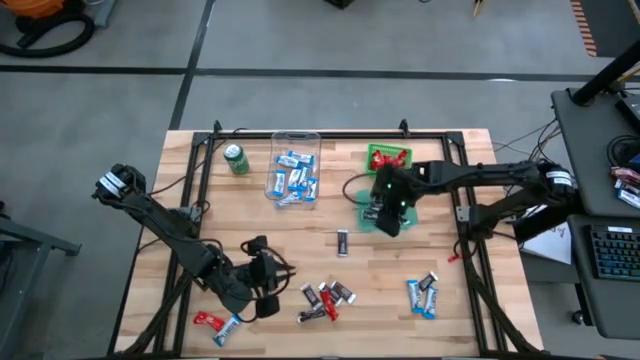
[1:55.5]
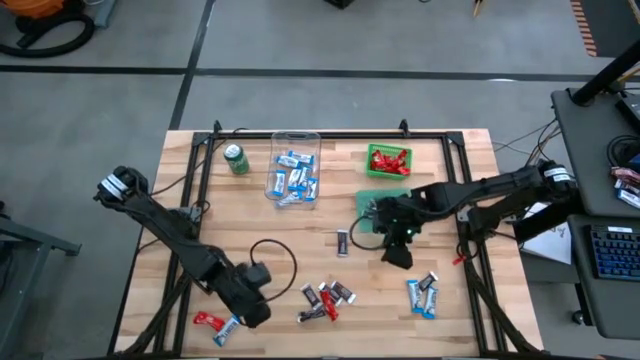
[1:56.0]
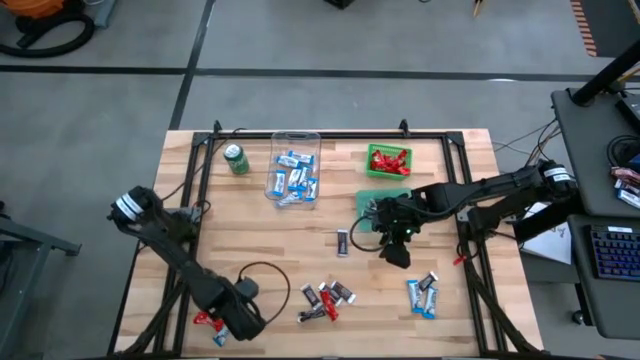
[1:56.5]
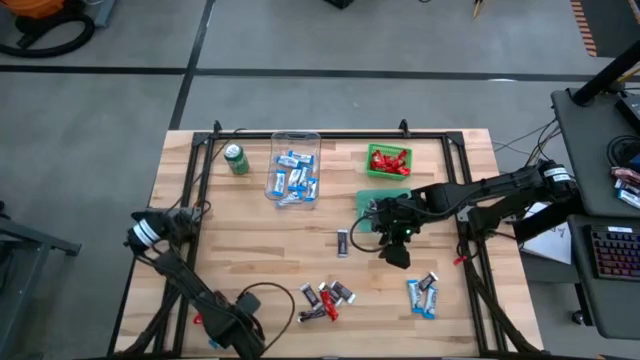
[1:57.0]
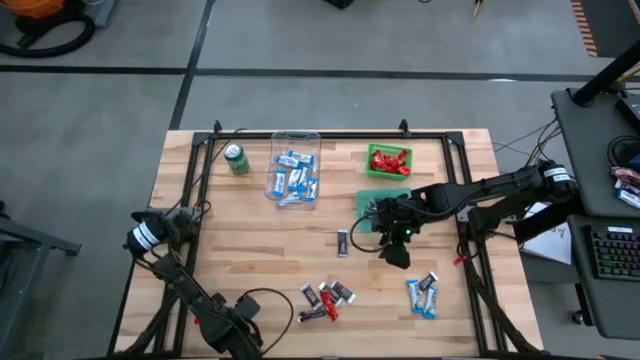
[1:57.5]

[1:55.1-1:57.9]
Task: Sort candy
Put the white candy into the transparent bin

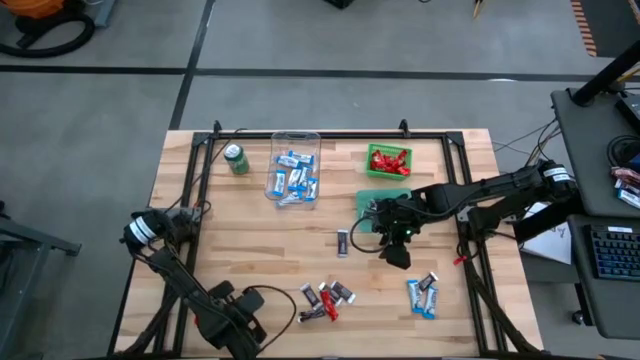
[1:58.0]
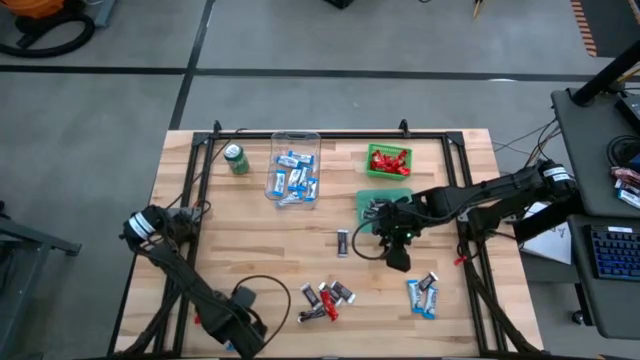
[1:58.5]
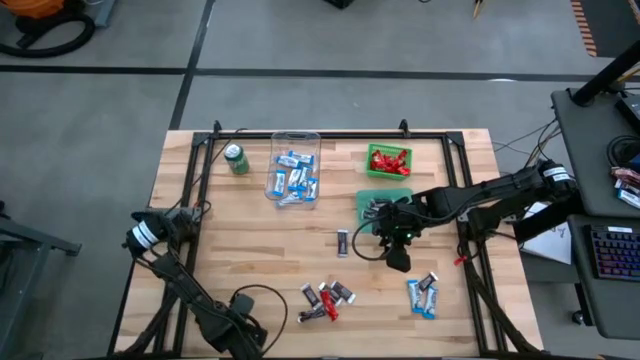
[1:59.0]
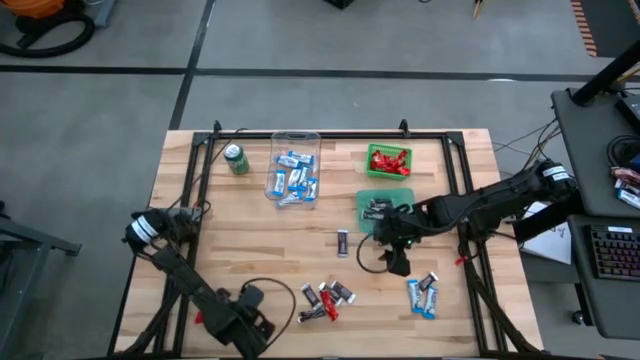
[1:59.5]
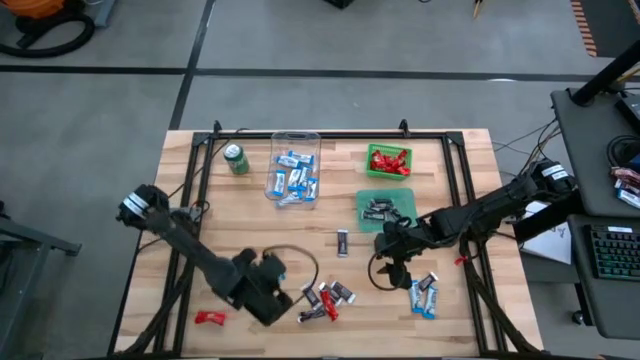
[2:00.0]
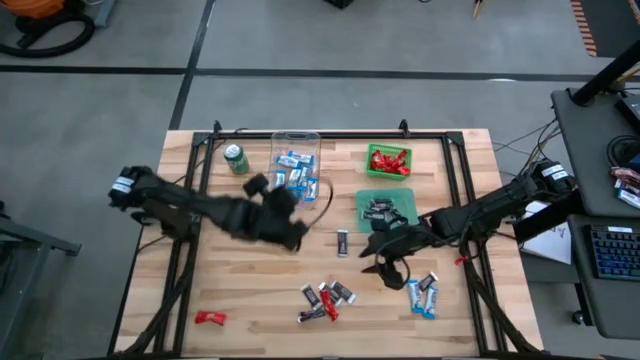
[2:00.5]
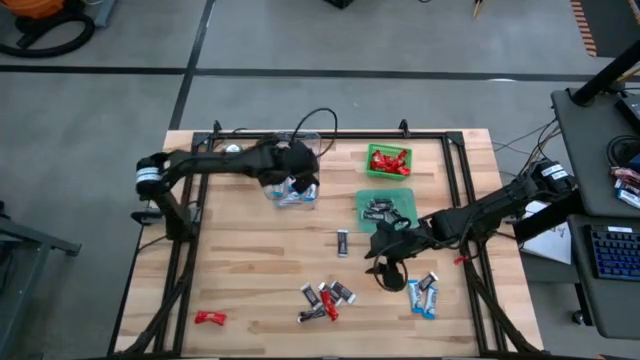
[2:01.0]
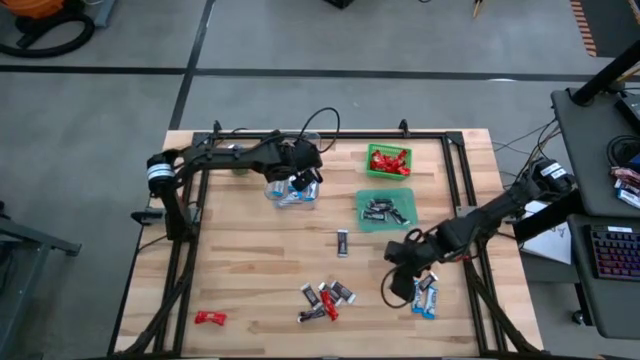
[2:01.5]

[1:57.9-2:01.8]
Put the white candy into the transparent bin

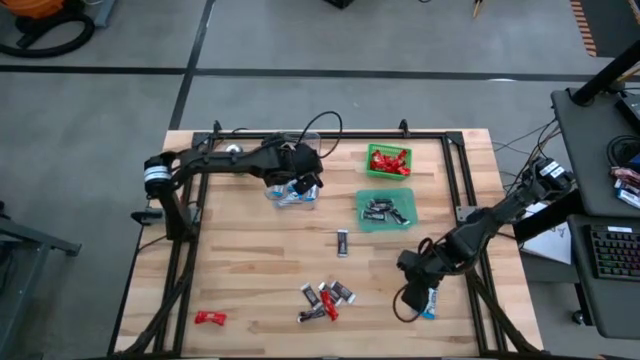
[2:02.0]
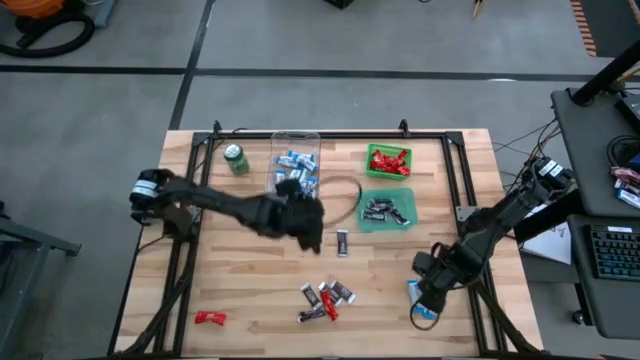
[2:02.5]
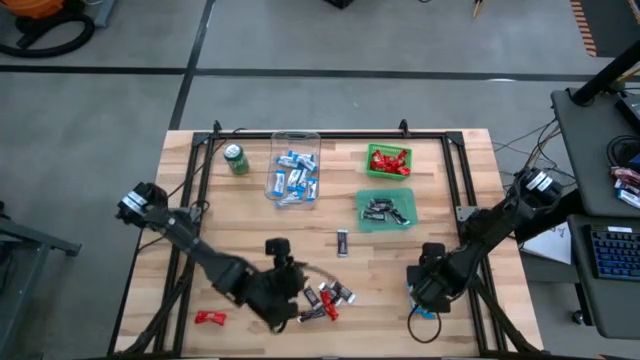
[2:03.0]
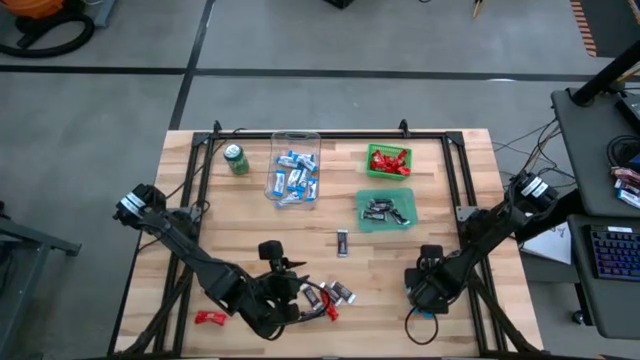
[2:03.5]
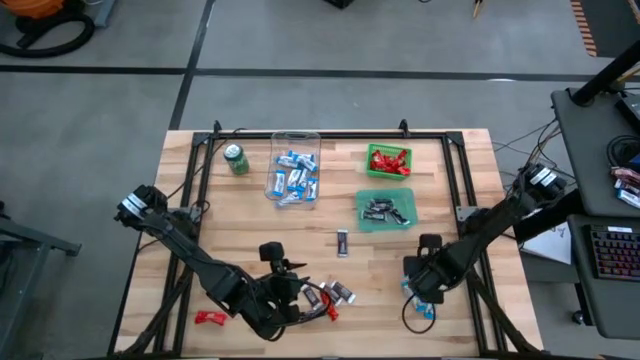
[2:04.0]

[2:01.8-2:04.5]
Put the brown candy into the blue bin

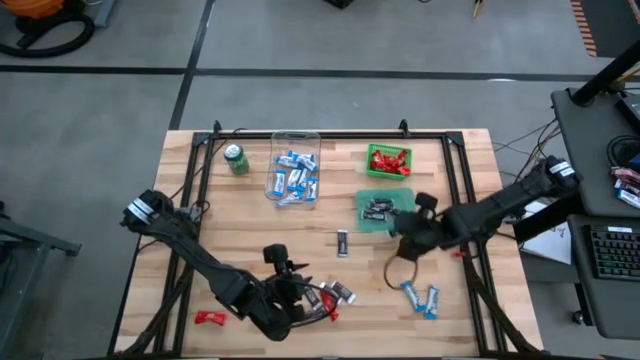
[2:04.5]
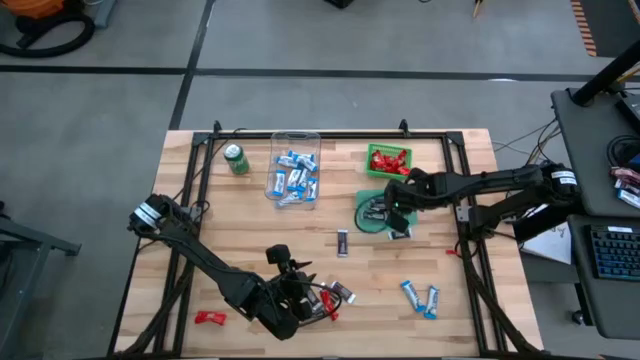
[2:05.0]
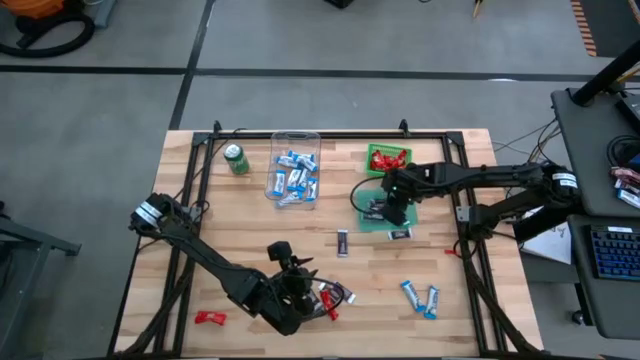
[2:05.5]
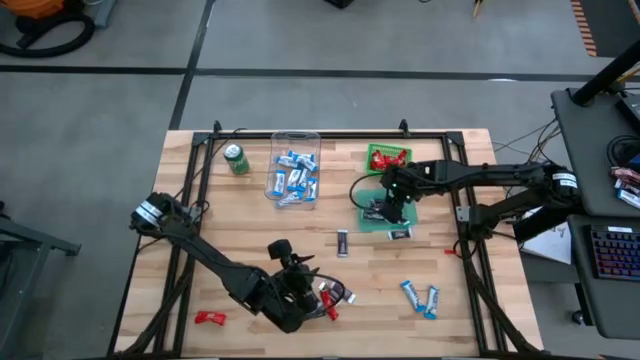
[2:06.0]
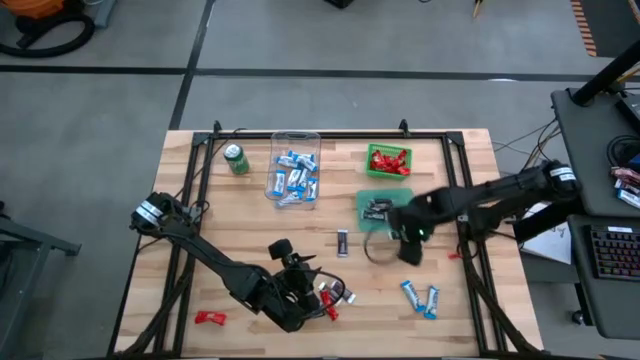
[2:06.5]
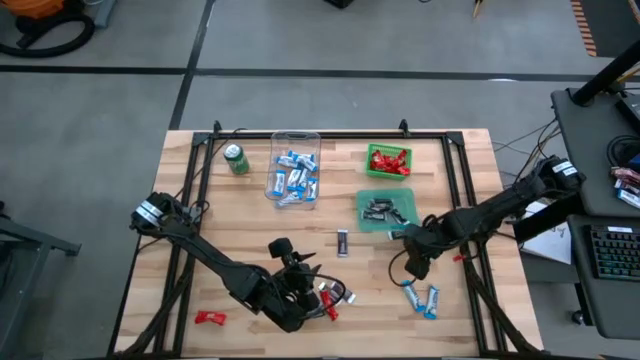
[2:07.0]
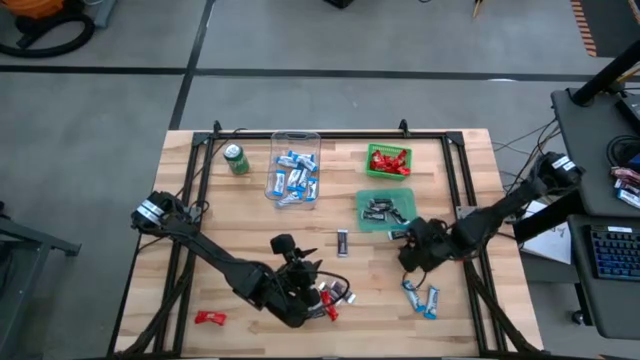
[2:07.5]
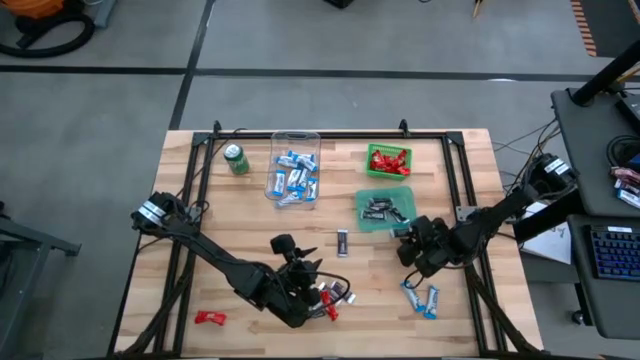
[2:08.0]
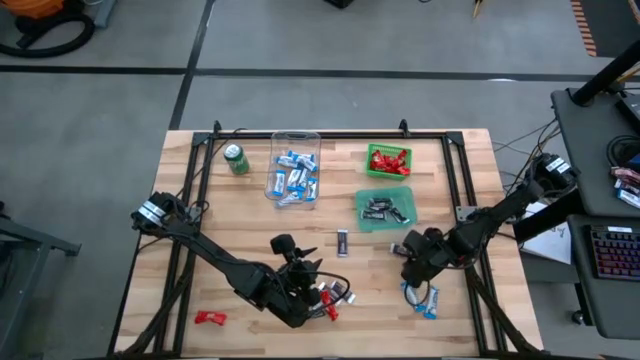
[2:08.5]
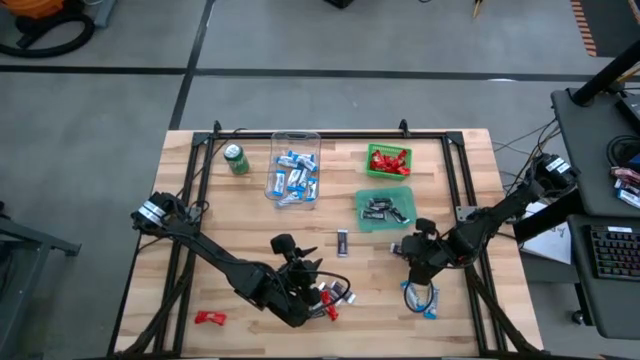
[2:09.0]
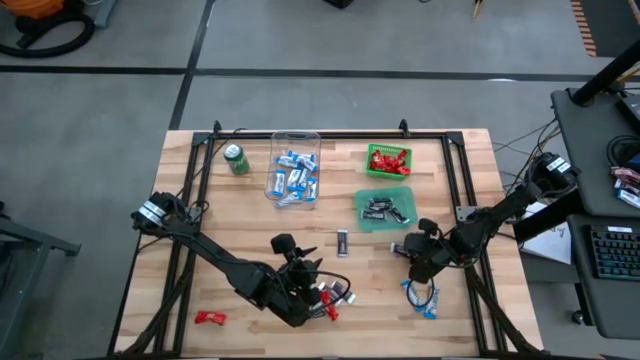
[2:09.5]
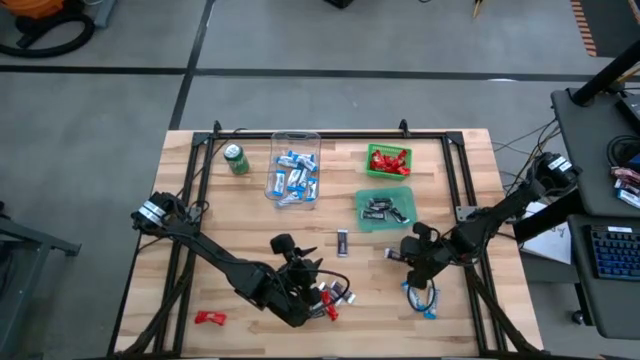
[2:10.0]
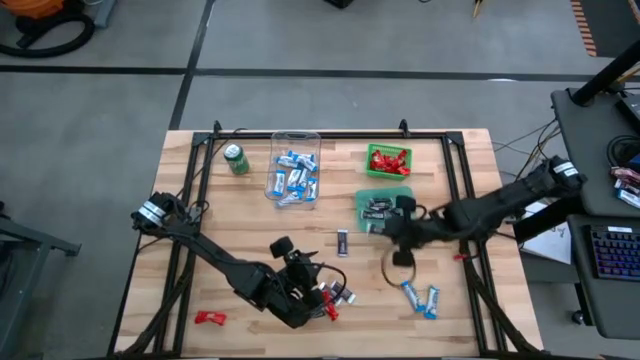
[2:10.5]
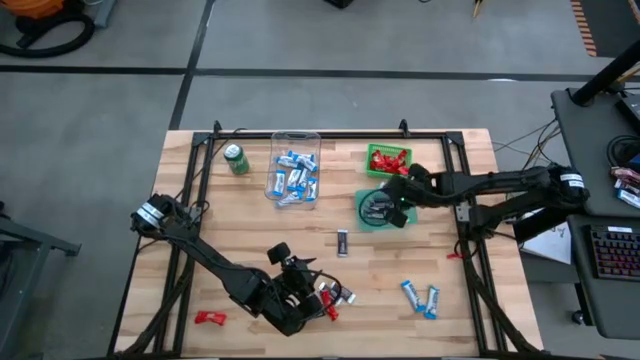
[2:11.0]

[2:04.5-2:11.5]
Put the brown candy into the blue bin

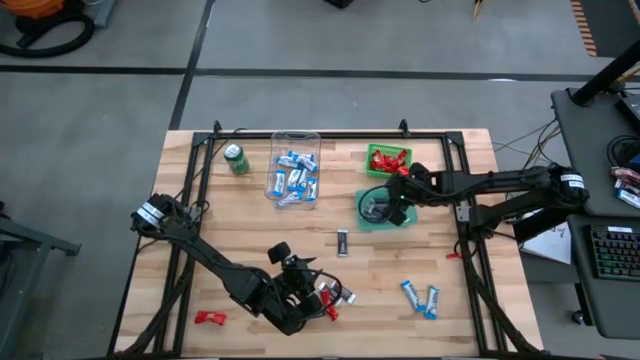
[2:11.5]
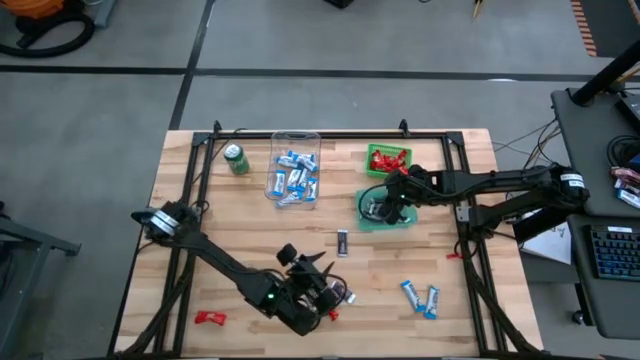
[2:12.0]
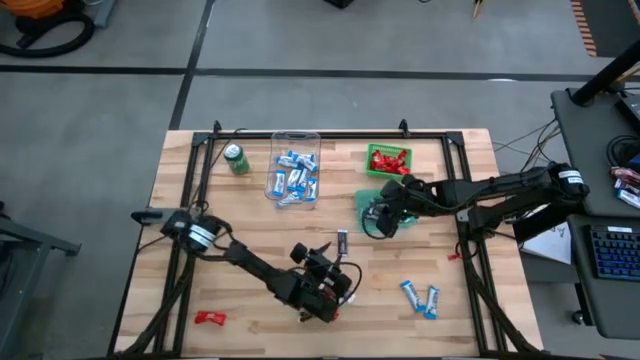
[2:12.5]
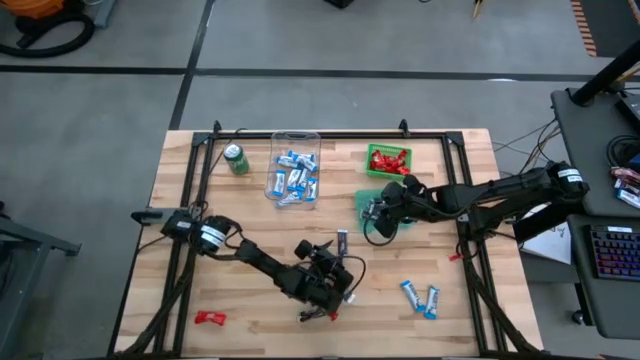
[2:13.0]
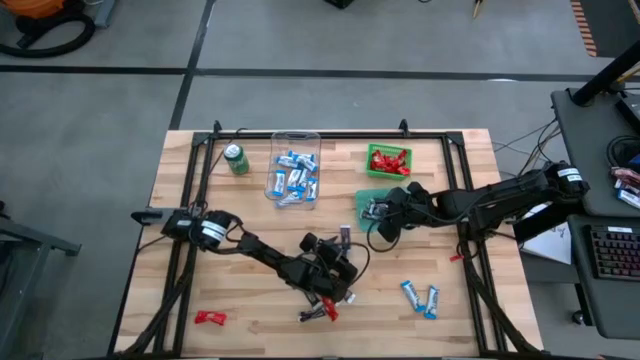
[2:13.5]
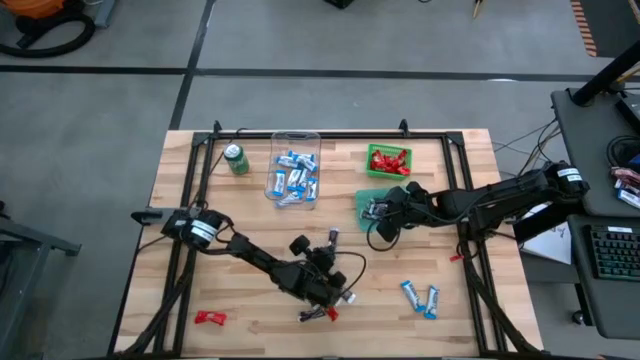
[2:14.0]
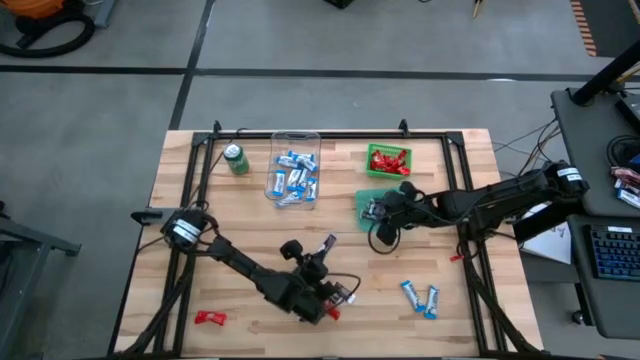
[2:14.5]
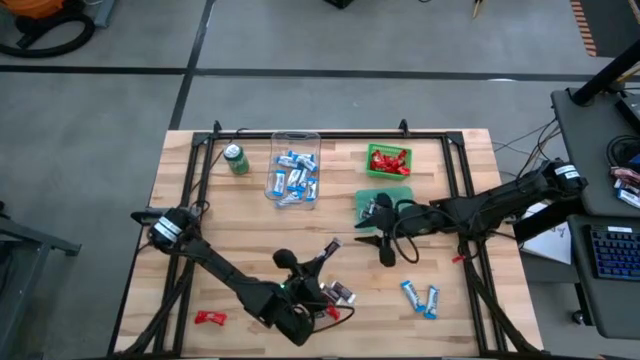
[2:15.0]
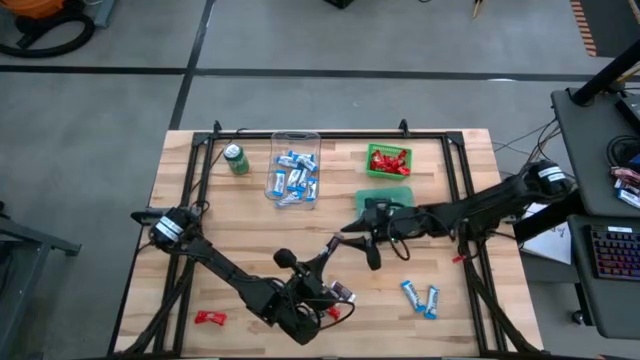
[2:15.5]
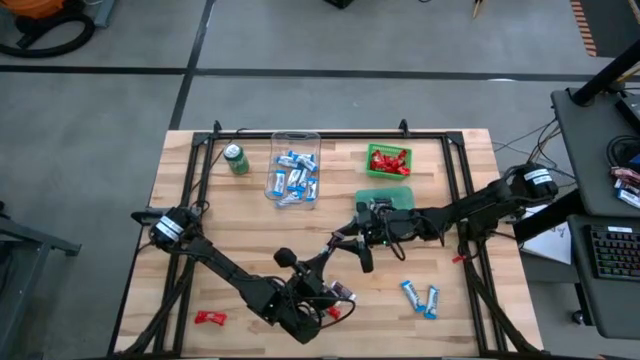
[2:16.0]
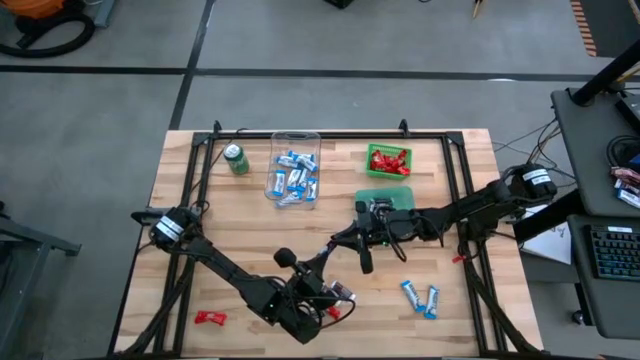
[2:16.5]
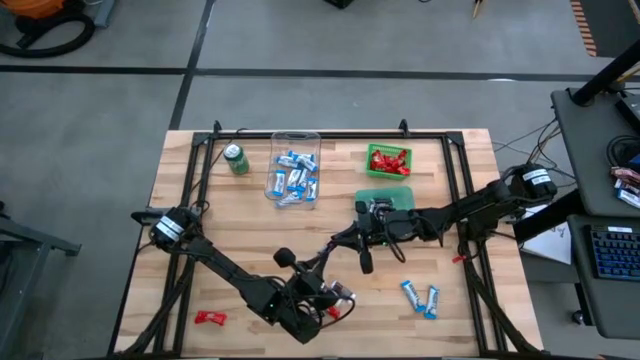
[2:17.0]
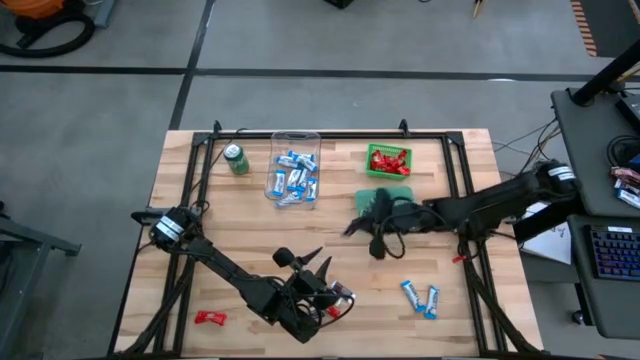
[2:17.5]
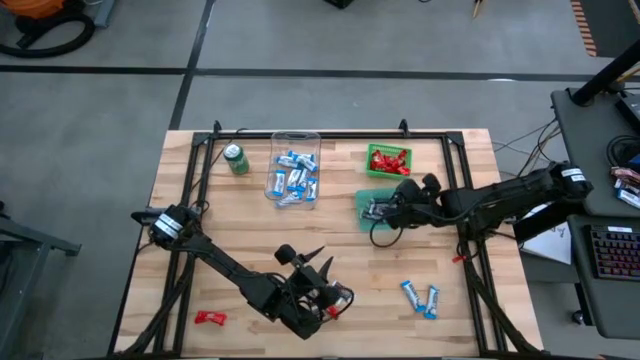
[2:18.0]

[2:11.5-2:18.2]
Put the brown candy into the blue bin
